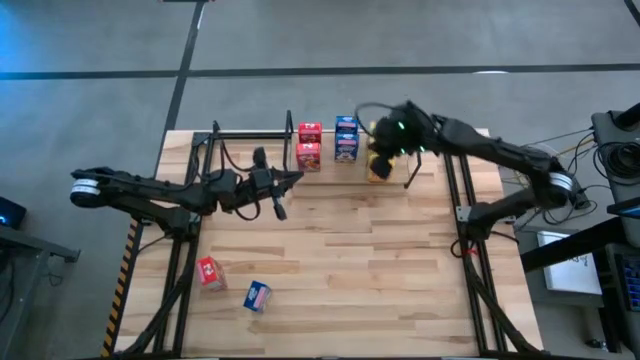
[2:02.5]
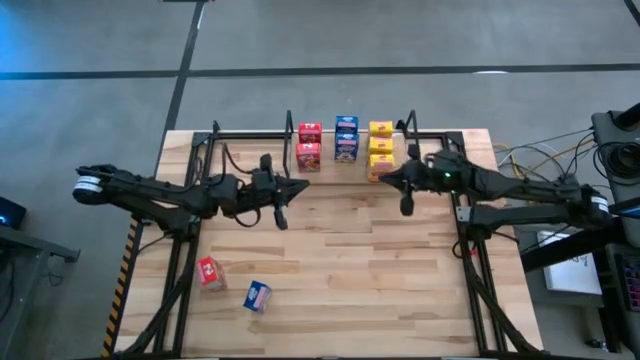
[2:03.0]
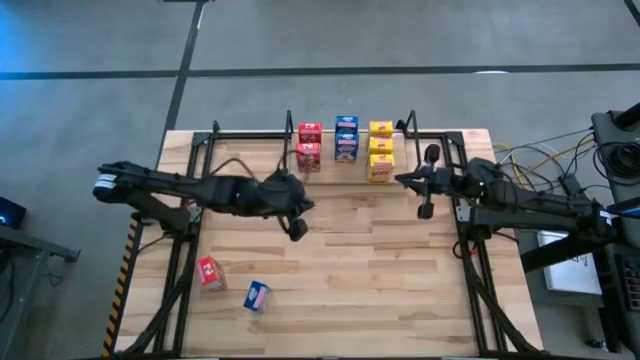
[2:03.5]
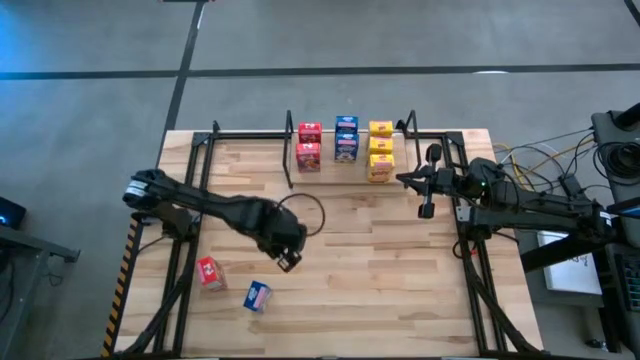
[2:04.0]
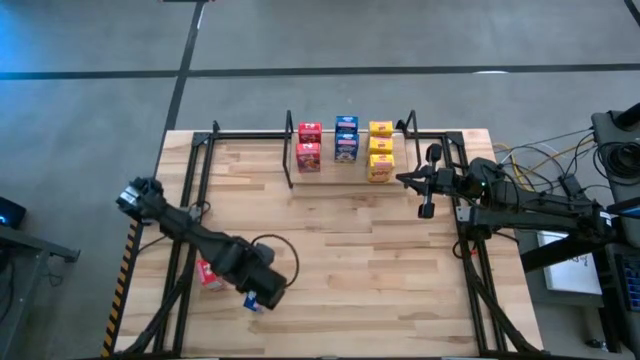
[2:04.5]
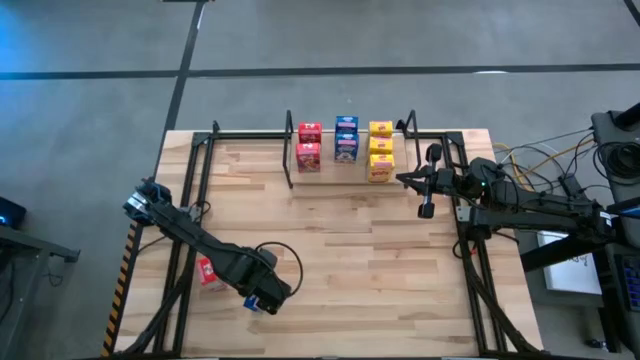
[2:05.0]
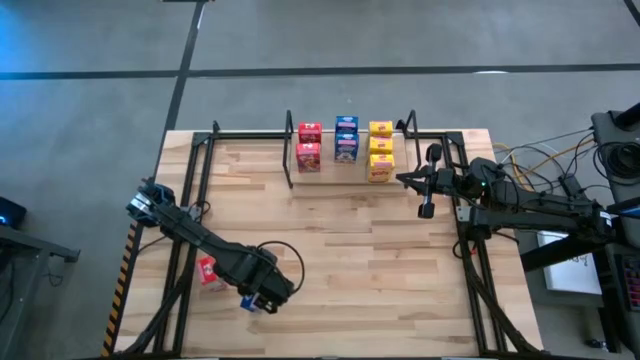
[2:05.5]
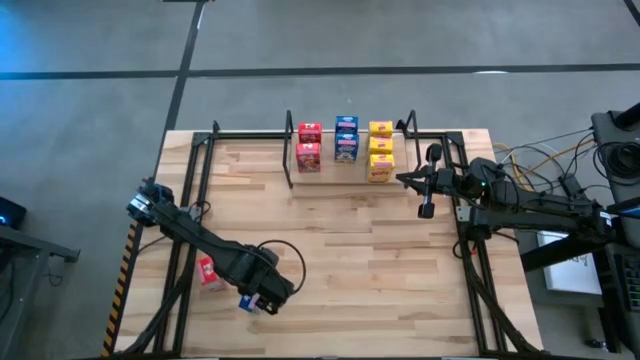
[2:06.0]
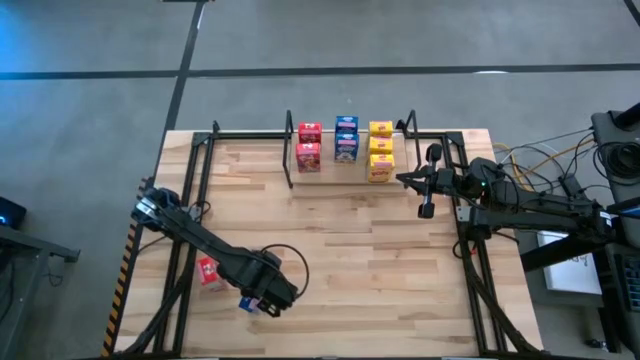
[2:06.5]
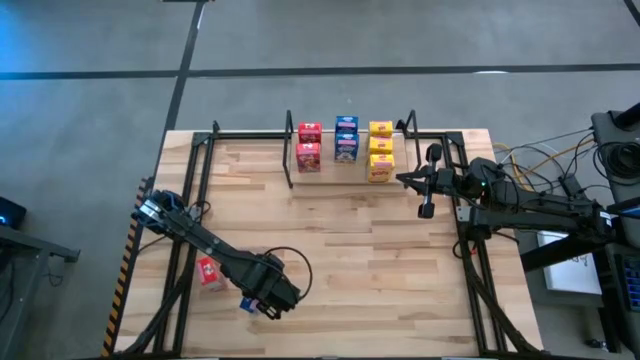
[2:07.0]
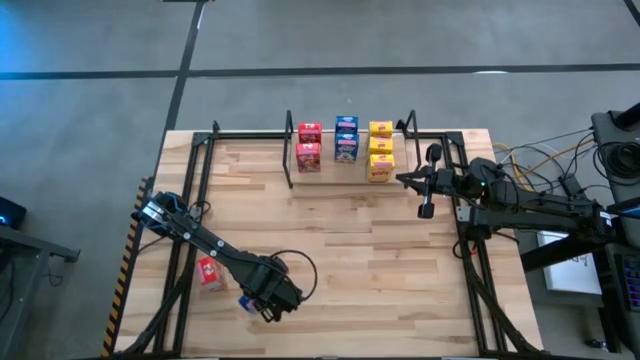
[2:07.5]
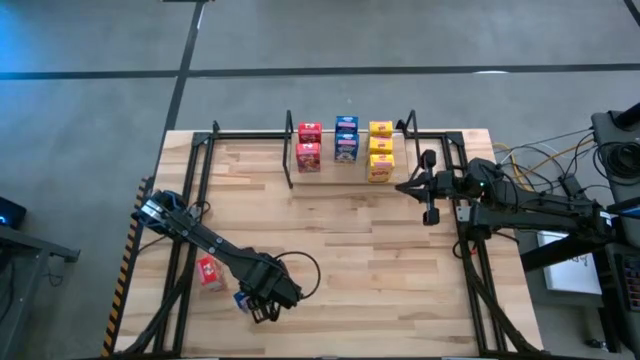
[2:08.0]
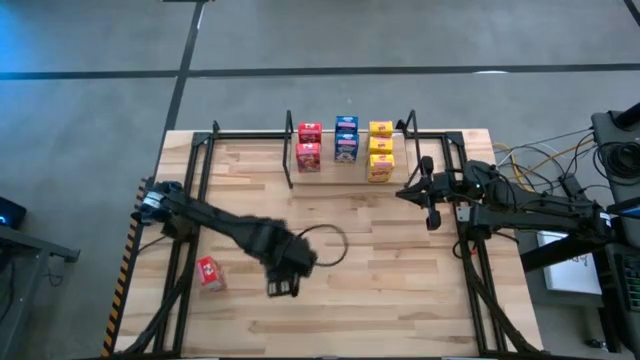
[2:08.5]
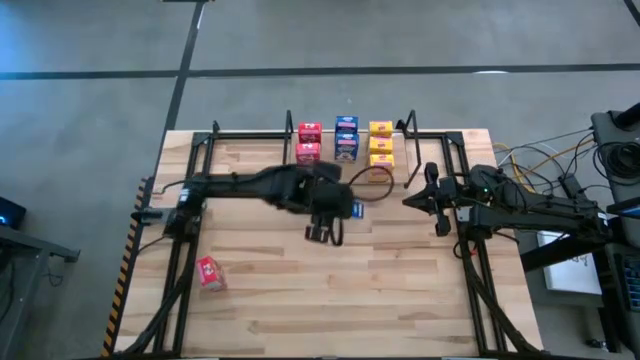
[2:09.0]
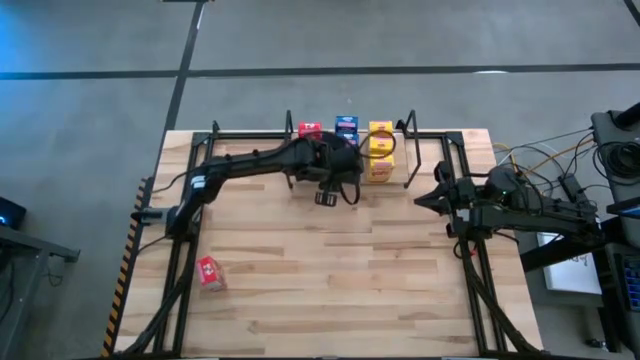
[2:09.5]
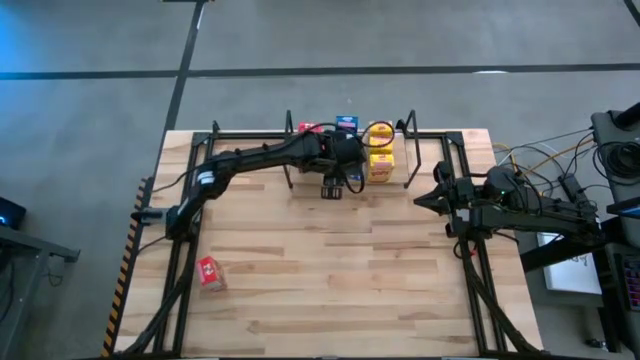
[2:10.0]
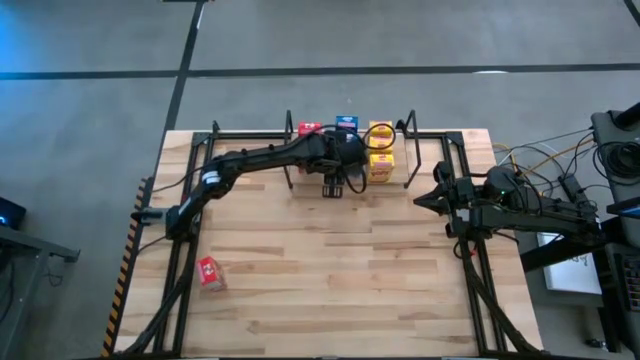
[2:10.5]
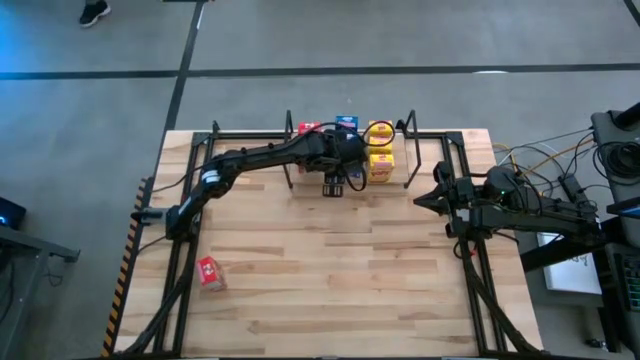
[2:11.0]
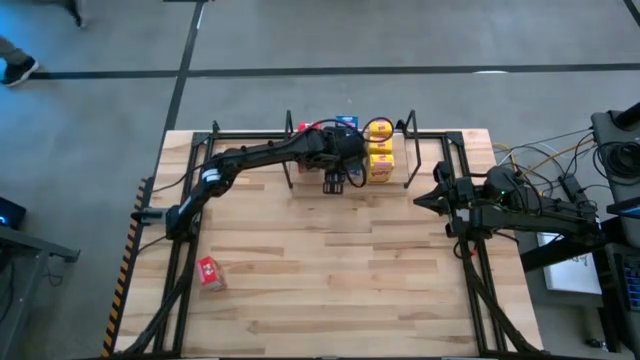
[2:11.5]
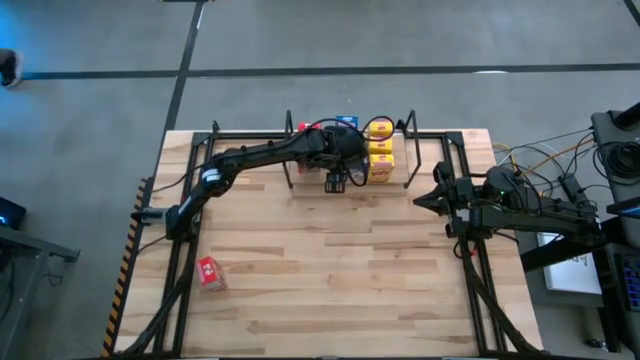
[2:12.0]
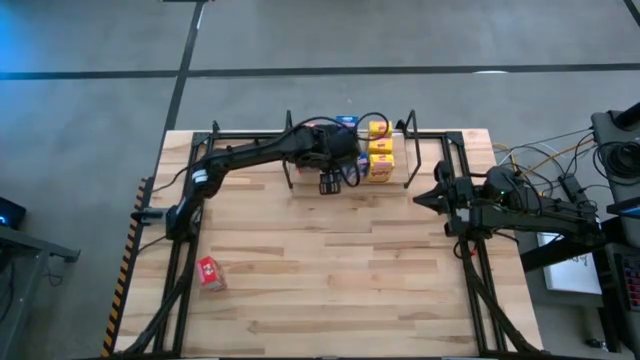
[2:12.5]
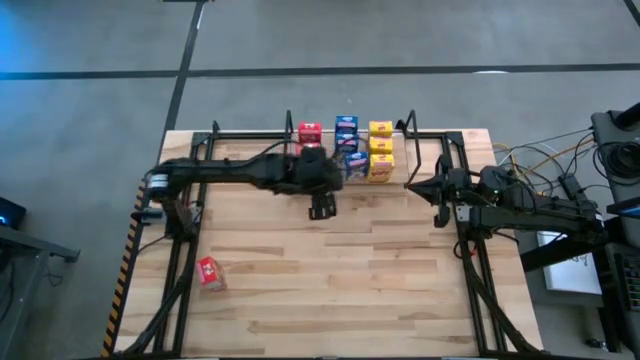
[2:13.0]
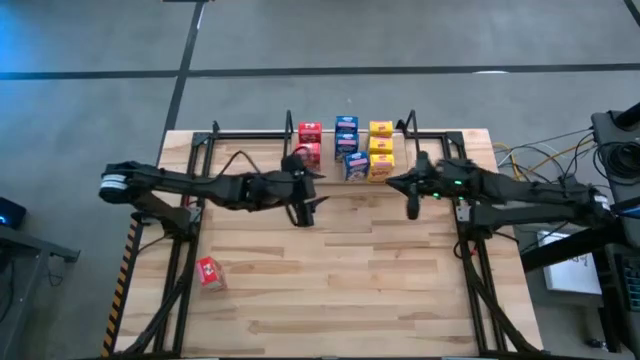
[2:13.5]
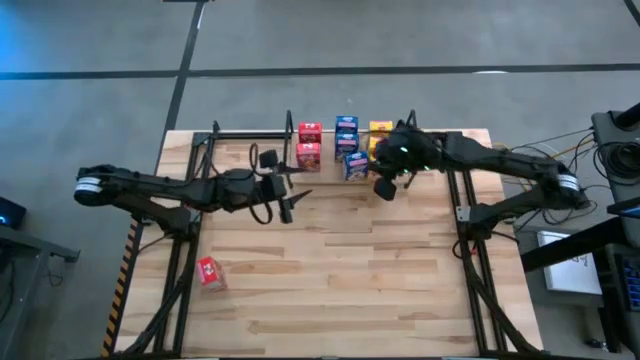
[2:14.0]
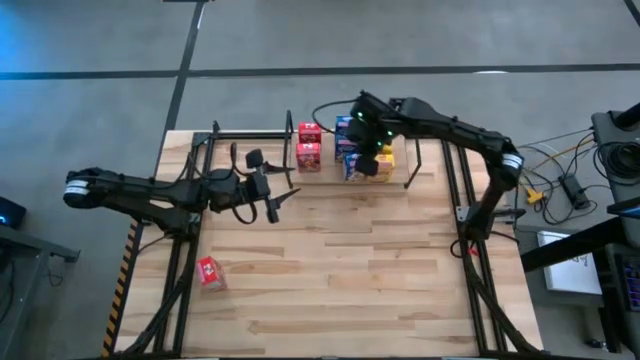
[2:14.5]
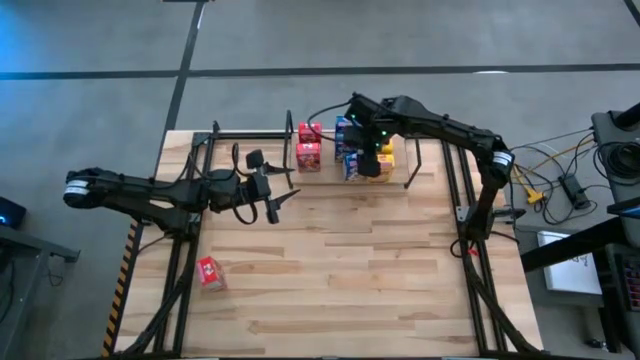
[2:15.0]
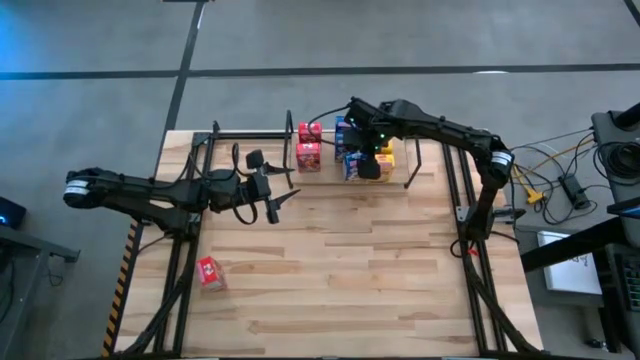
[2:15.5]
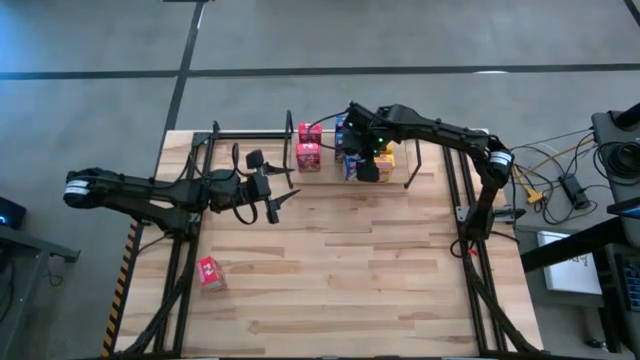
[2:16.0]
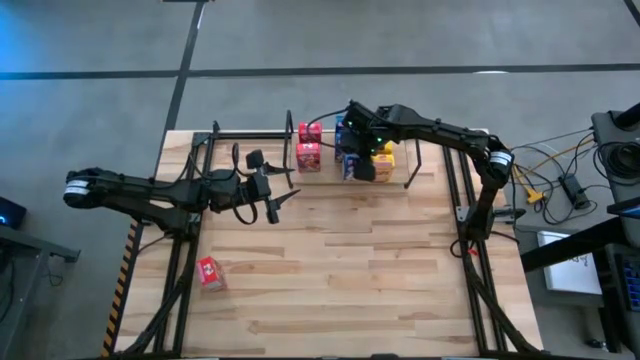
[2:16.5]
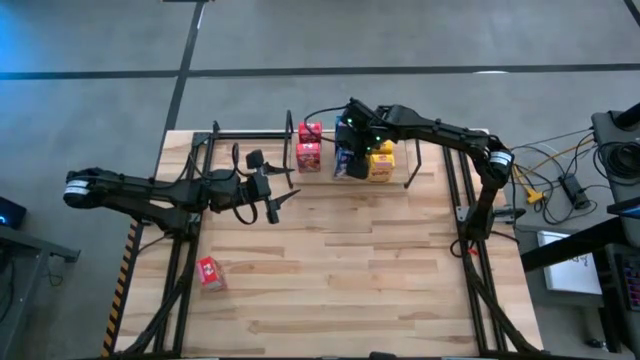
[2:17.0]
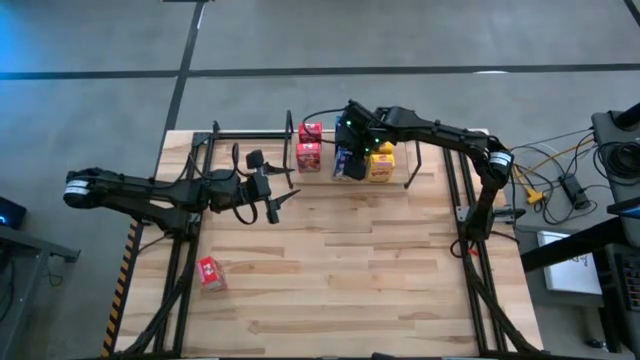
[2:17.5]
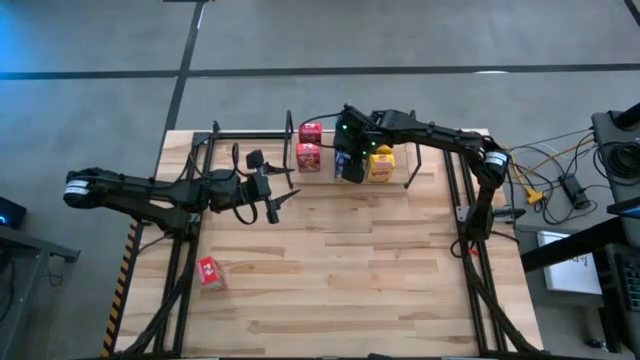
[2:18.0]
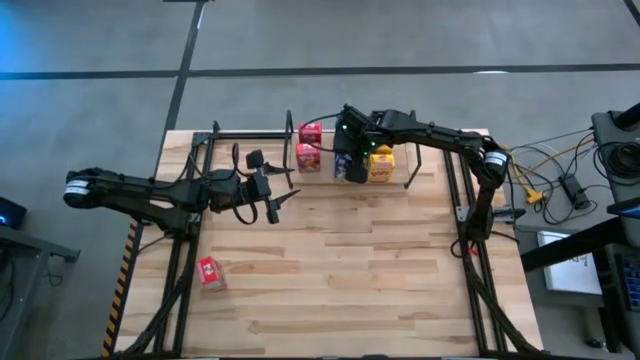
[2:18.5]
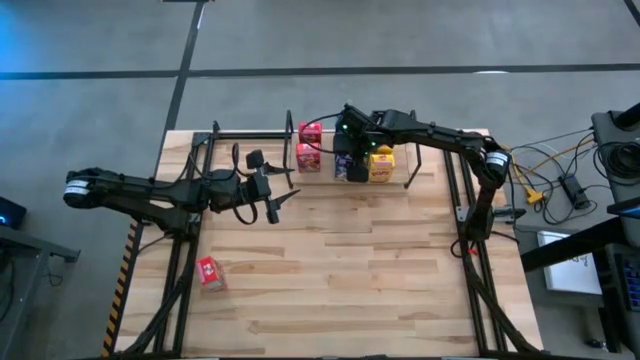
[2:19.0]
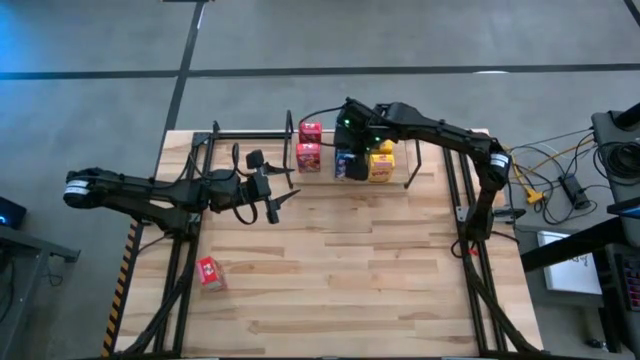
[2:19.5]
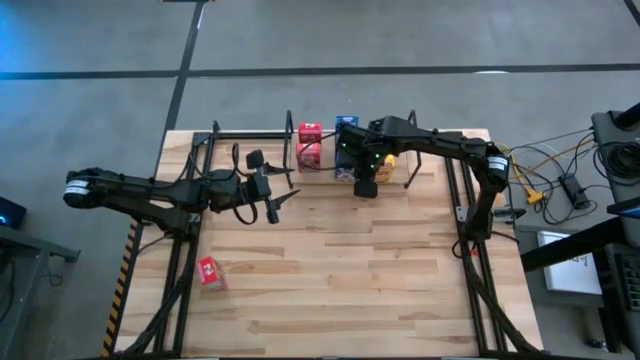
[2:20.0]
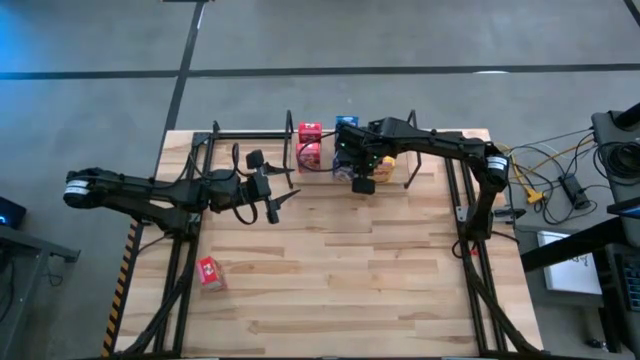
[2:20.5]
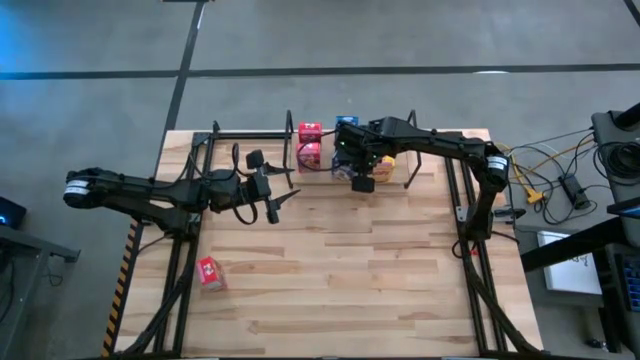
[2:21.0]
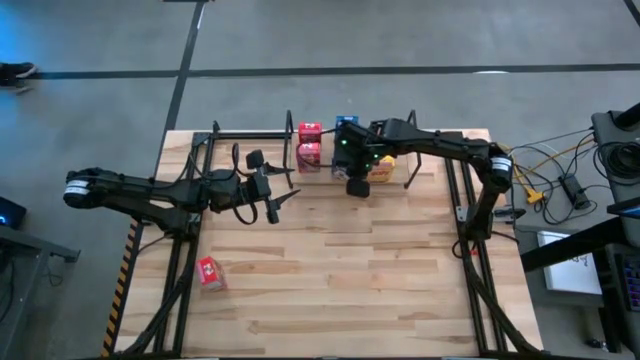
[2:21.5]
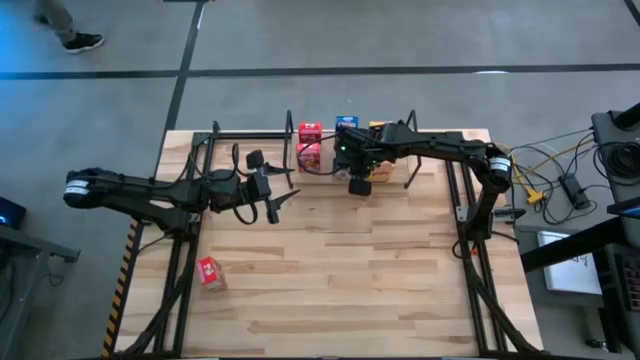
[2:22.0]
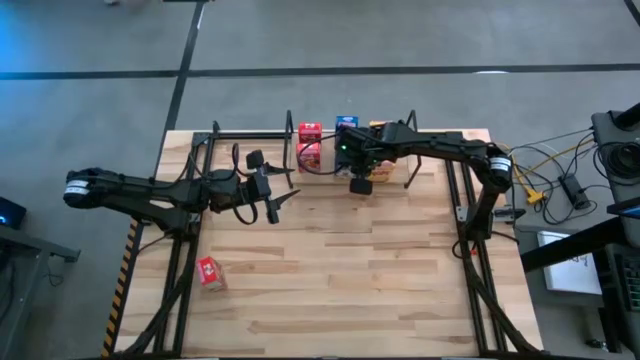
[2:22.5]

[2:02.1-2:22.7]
Task: Stack cereal on shelf
Put the blue cereal box on the shelf aligned with the other blue cereal boxes
